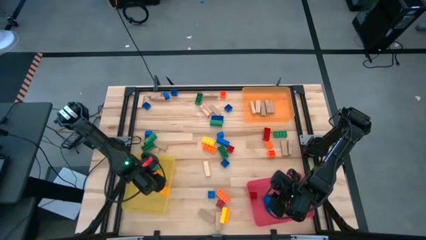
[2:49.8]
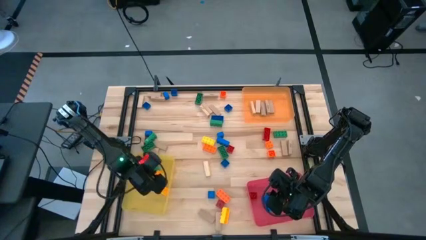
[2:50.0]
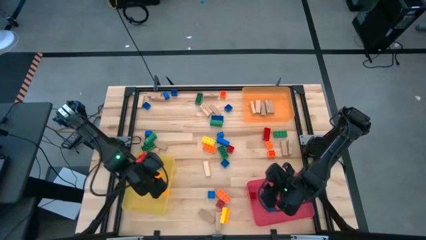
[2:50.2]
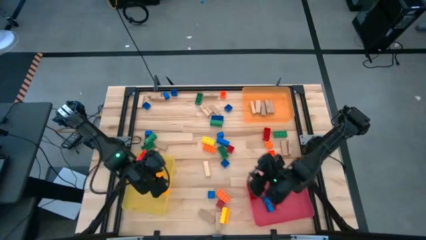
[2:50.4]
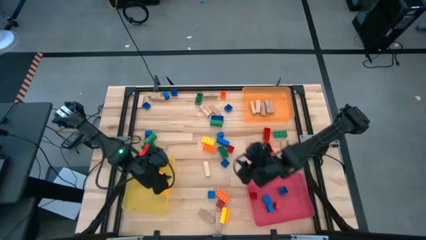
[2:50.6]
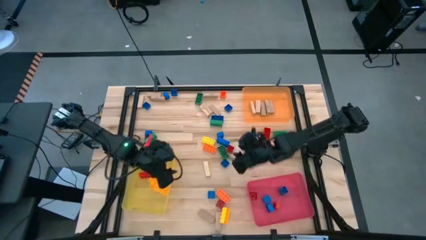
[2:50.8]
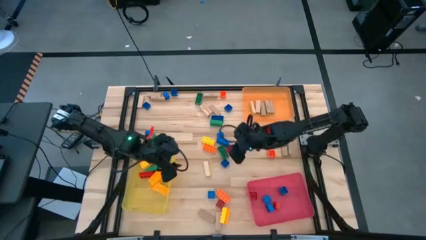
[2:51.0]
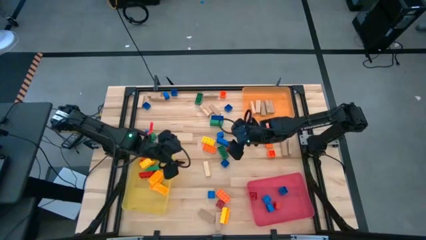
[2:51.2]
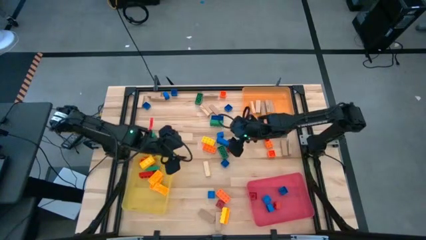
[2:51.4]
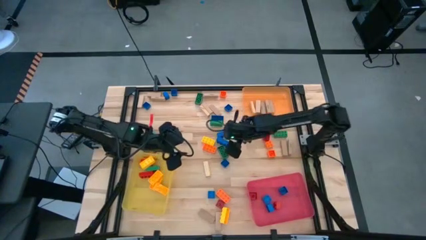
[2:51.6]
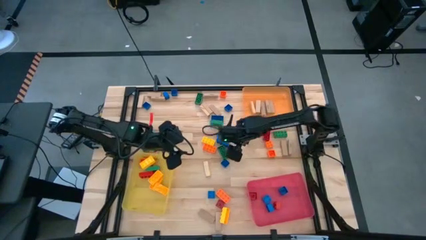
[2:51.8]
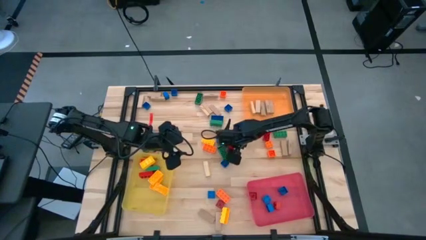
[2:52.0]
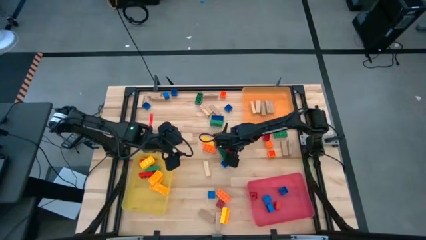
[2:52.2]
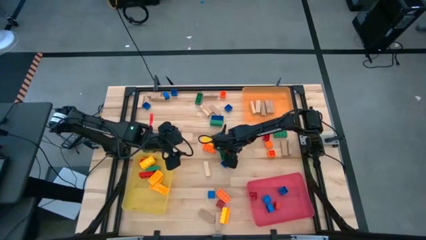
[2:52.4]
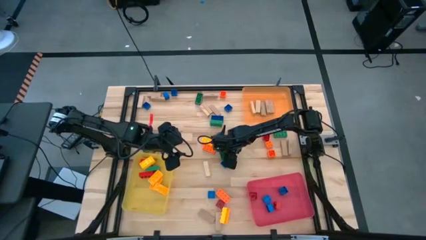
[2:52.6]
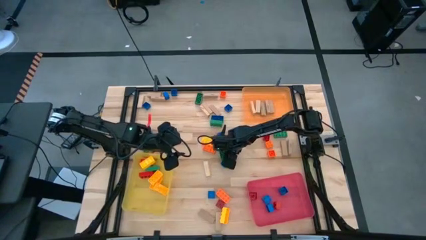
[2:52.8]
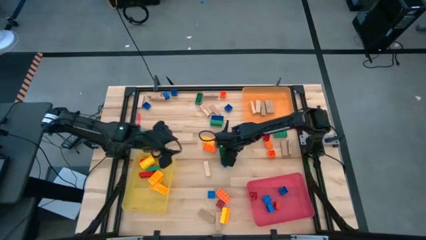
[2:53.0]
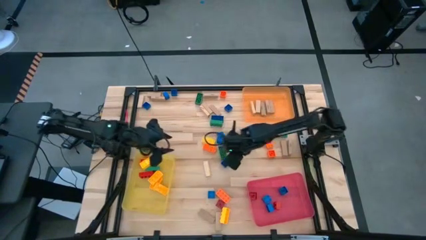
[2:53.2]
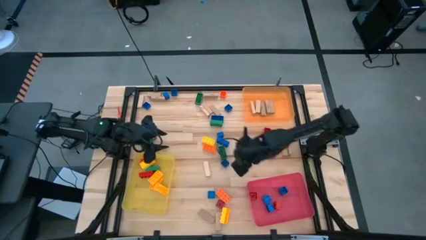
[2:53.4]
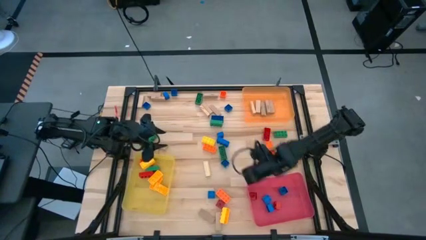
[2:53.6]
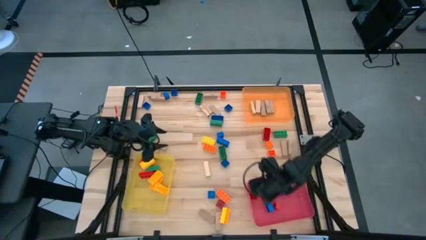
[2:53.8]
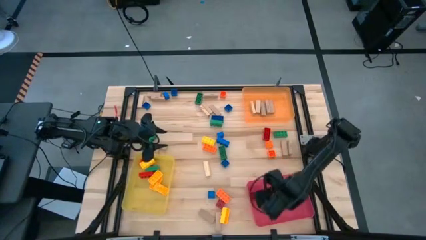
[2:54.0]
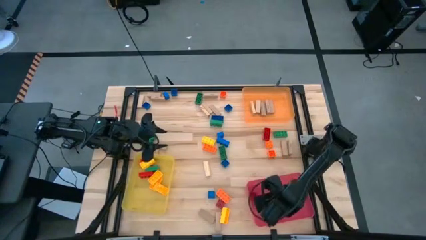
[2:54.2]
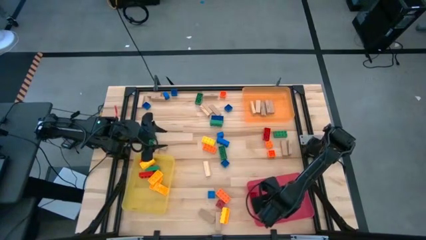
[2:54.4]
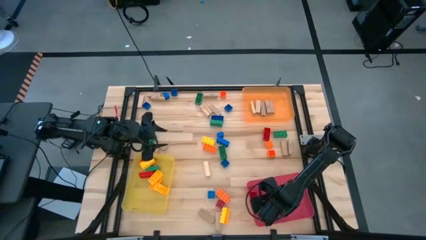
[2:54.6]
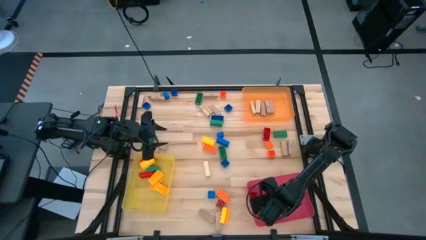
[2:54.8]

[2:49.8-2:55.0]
Task: Sort blocks by size
Put the small red game piece into the red bin

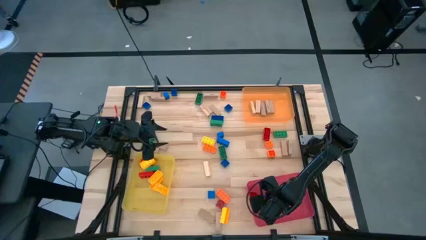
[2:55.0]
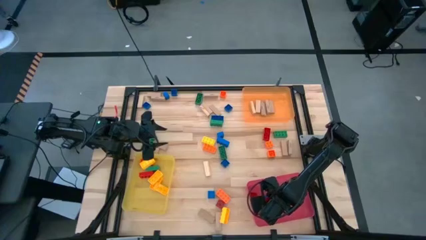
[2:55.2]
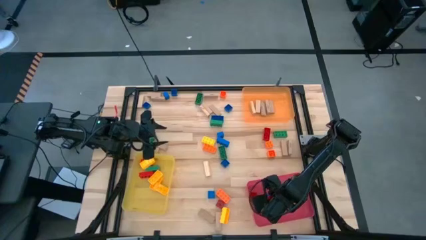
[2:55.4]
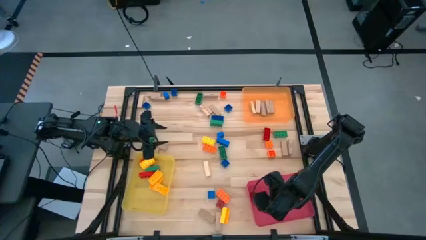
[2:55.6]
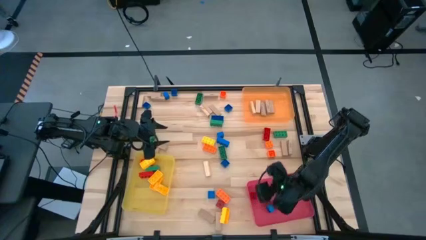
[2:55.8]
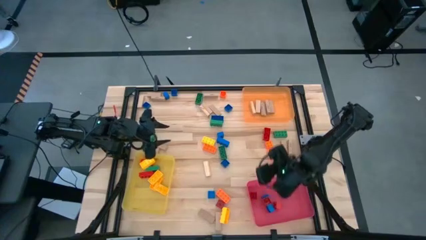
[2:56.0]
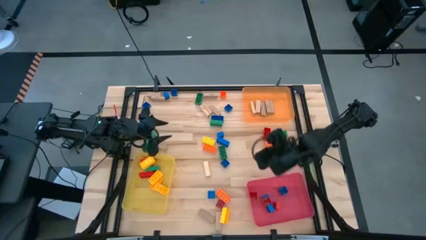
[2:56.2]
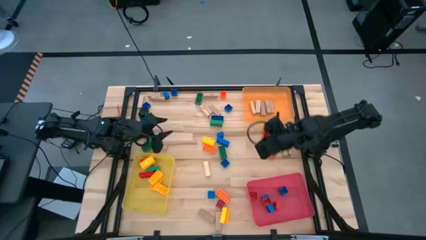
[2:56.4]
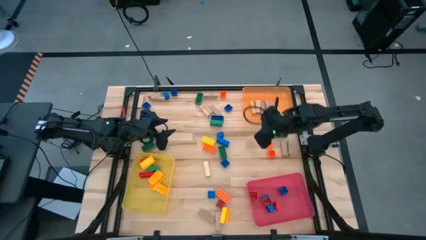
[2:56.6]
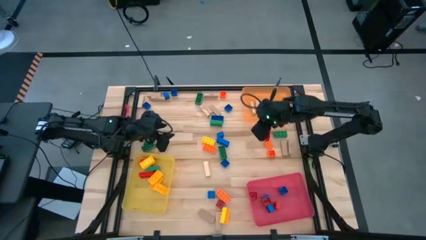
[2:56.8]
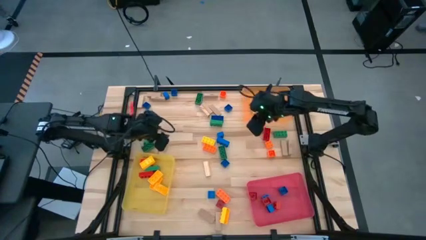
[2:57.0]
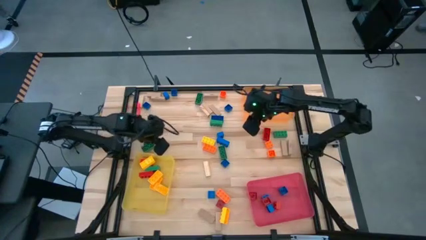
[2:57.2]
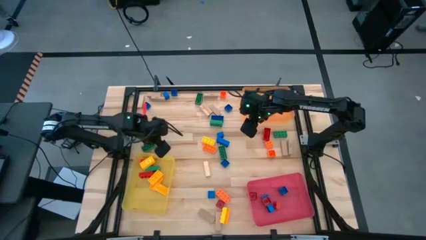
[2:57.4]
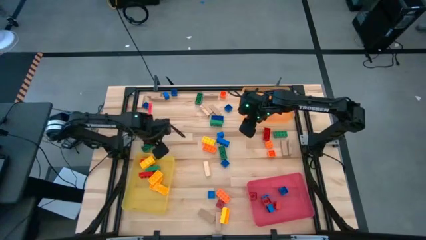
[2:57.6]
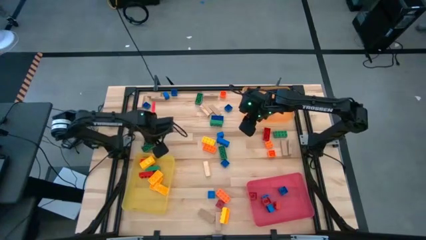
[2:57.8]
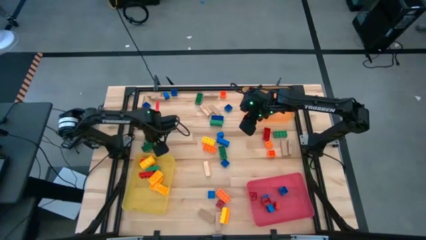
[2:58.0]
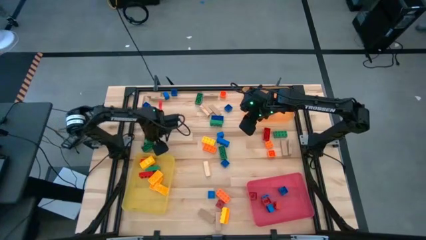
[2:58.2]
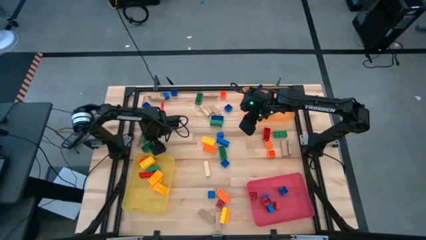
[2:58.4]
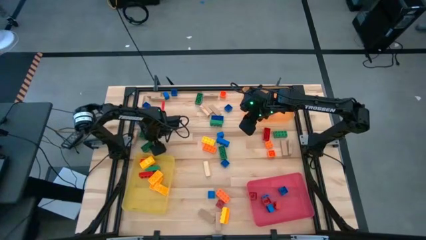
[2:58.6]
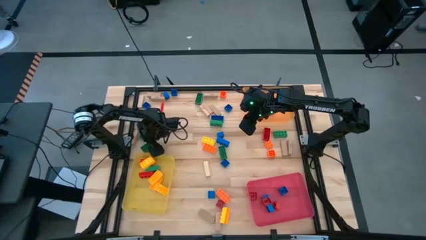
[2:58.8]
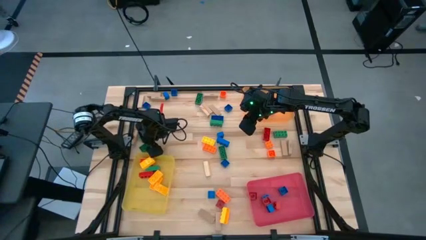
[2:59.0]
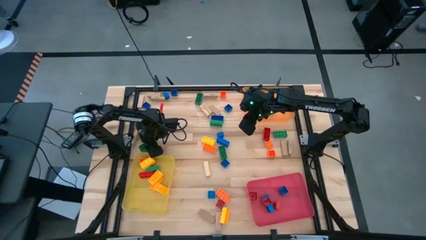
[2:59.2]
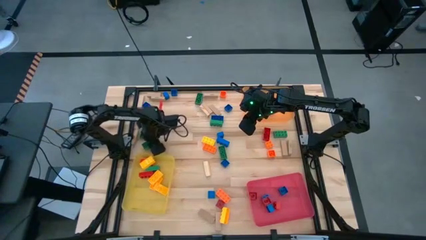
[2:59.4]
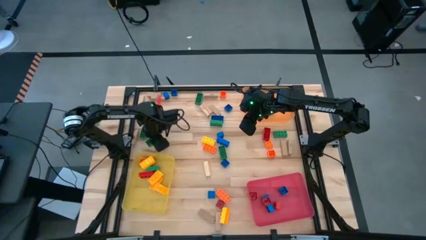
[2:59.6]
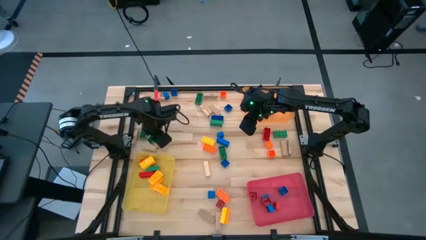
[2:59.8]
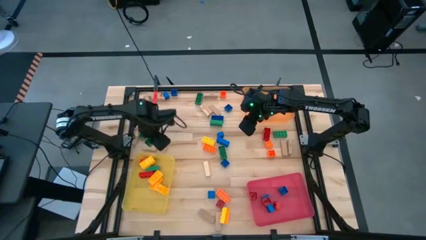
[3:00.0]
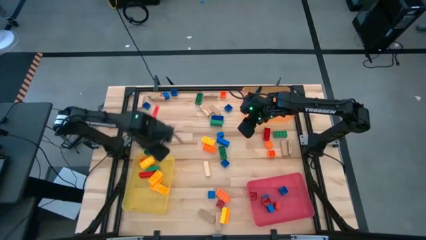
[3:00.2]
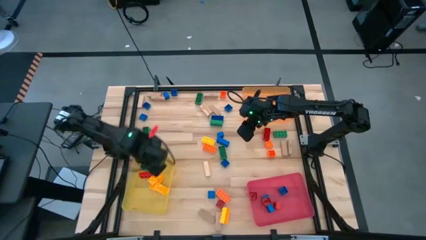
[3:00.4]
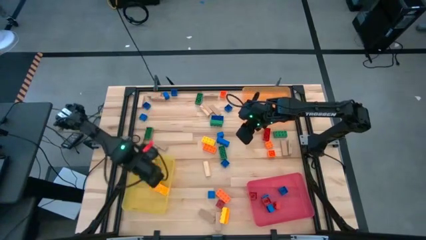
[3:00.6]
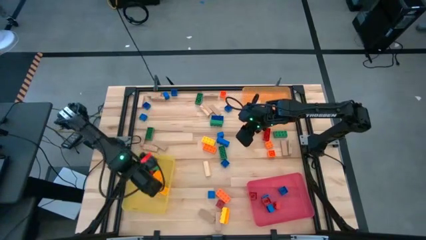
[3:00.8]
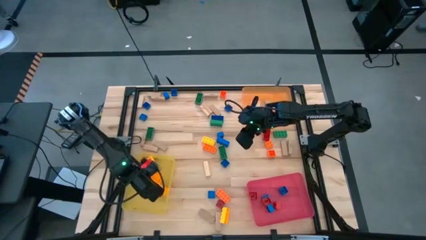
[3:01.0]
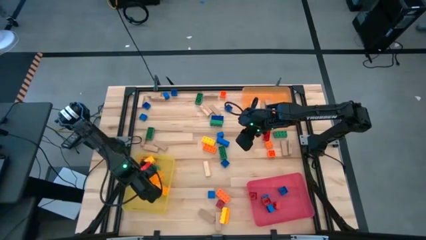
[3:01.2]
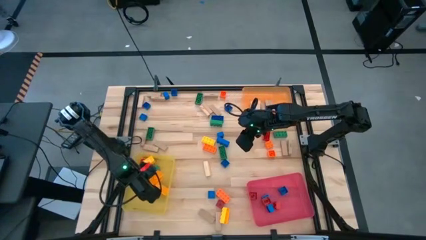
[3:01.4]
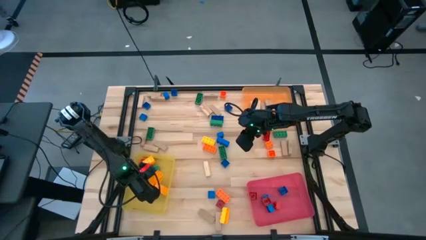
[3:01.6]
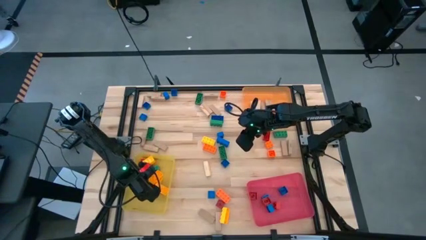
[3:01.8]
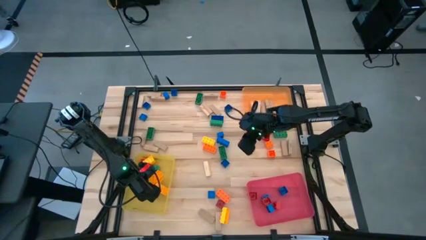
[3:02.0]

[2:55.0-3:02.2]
Put the large green game piece into the yellow bin

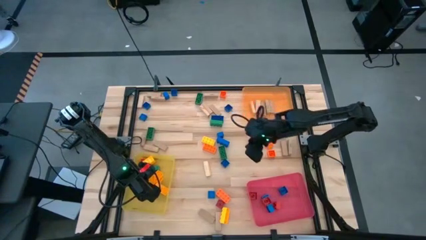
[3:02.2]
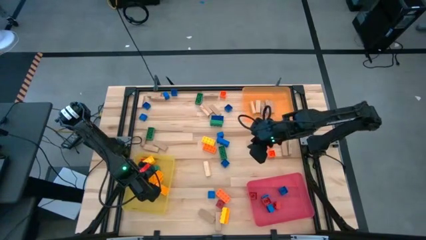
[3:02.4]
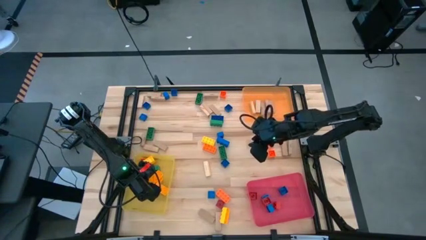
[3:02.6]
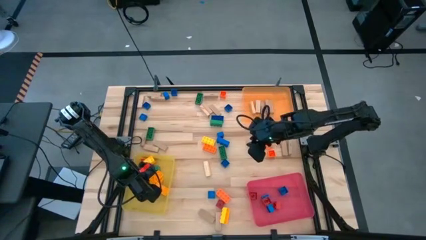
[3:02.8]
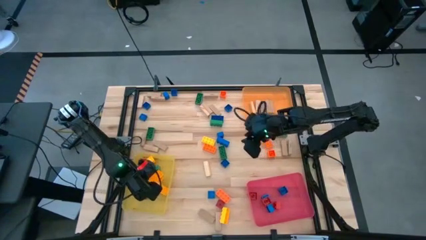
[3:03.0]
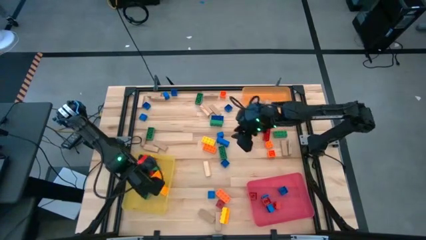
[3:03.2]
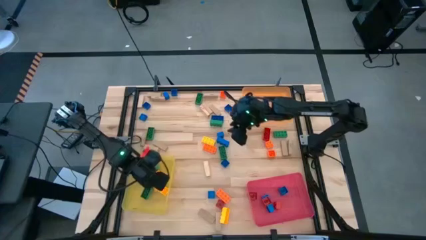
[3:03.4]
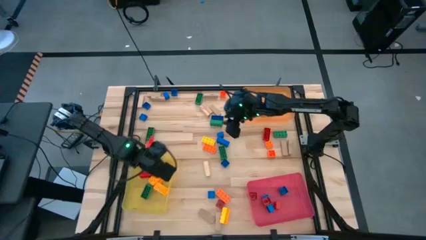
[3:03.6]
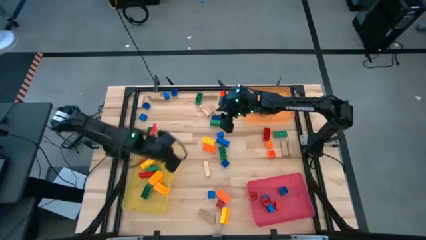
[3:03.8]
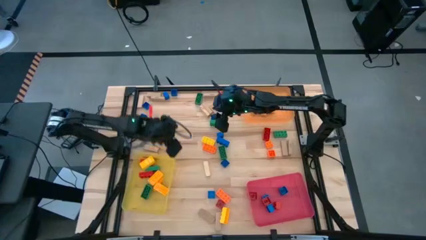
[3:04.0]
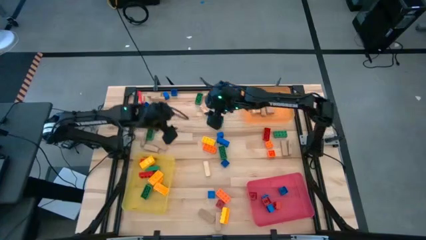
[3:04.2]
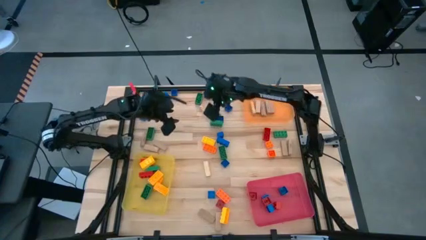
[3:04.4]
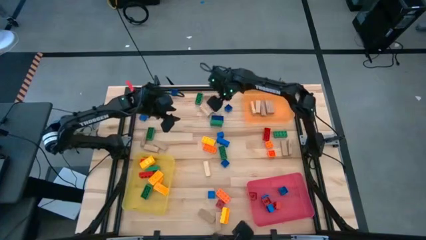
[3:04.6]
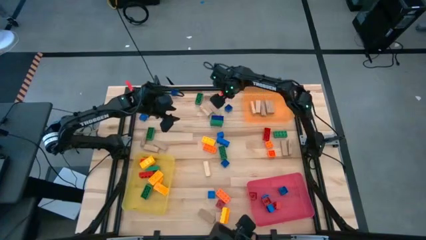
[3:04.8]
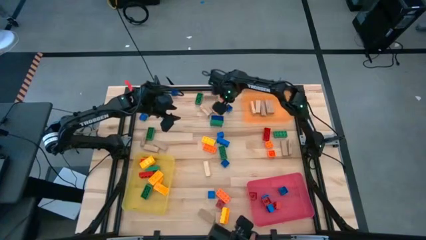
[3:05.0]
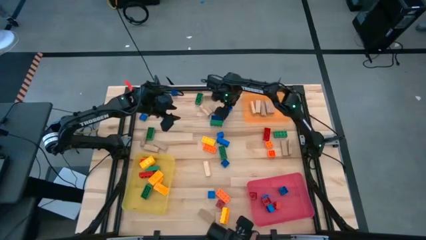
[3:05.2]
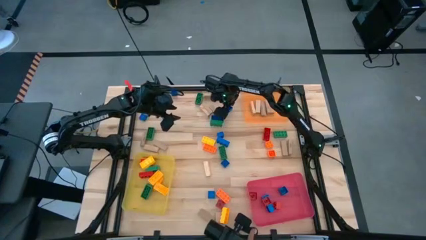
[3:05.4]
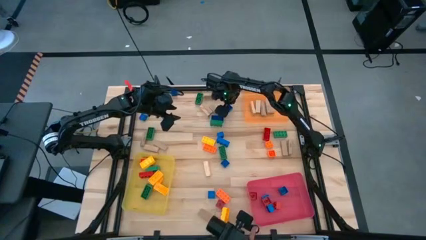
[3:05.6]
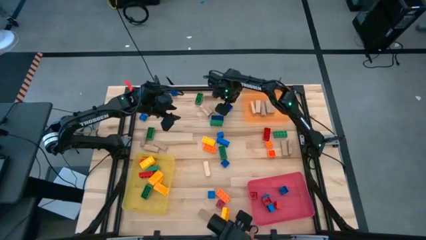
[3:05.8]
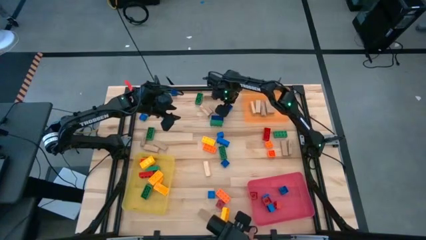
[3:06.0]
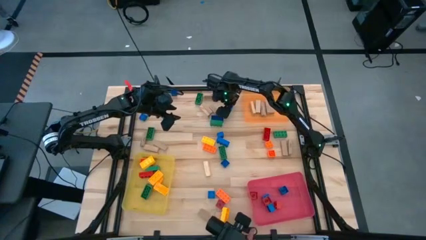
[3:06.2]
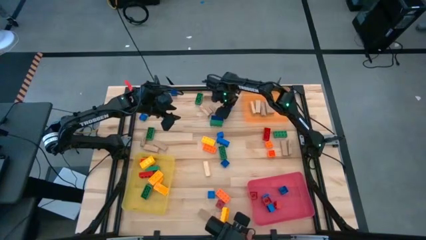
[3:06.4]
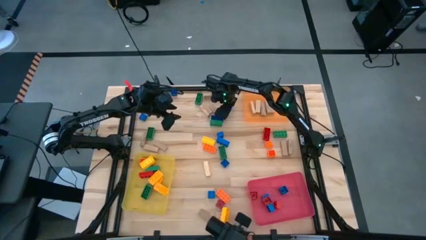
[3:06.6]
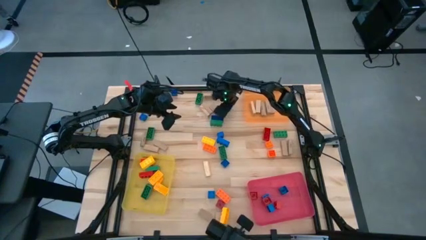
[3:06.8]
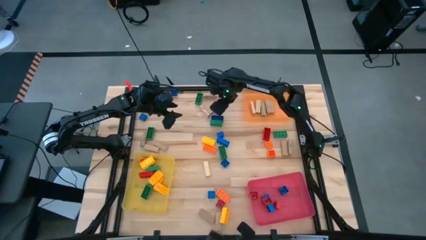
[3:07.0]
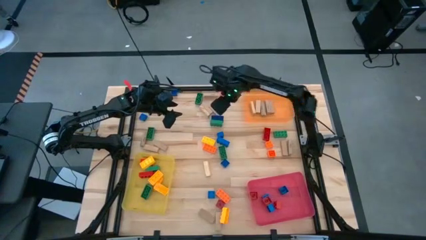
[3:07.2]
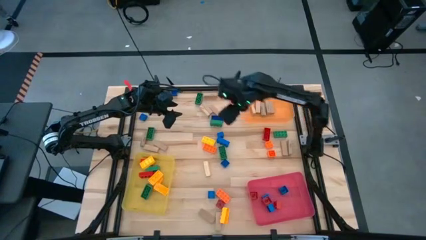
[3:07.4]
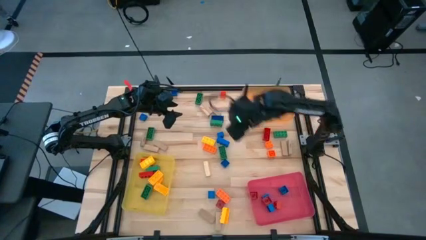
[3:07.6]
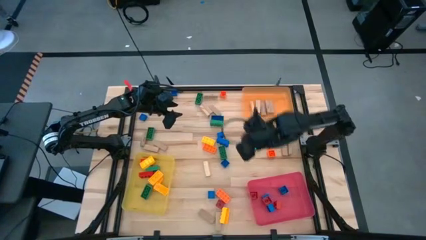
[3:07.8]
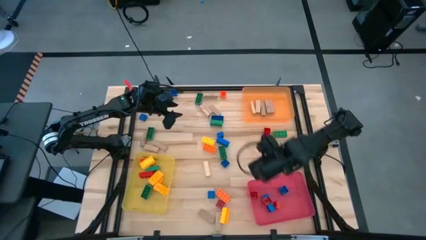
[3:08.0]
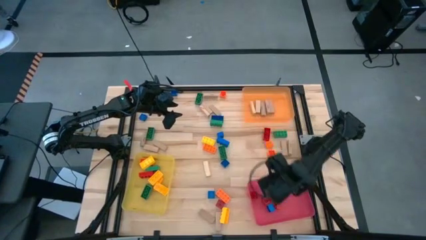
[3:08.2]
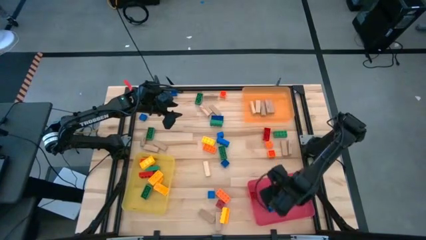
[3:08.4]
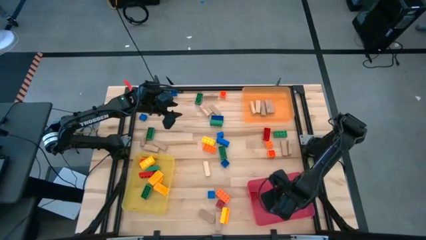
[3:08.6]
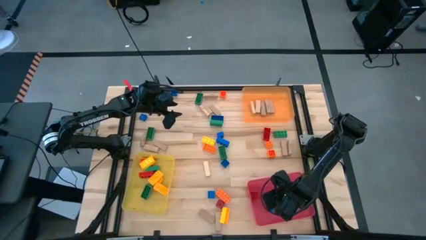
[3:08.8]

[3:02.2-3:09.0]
Put the small blue game piece into the red bin
